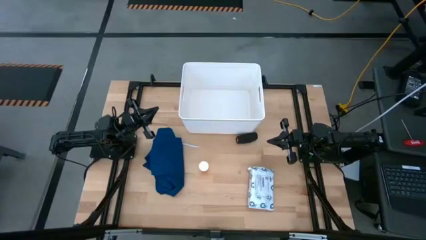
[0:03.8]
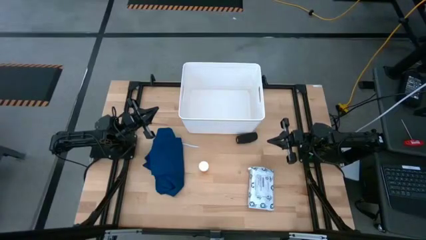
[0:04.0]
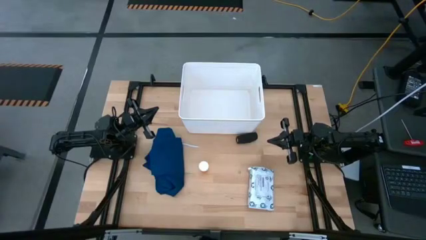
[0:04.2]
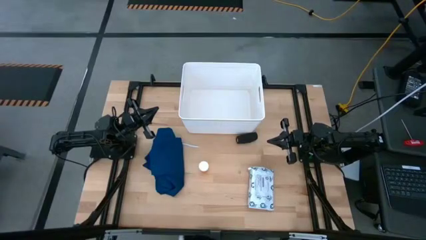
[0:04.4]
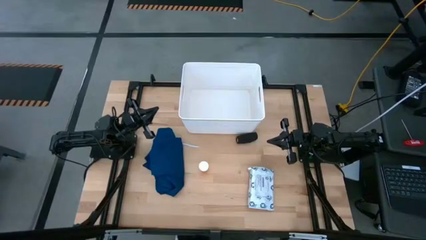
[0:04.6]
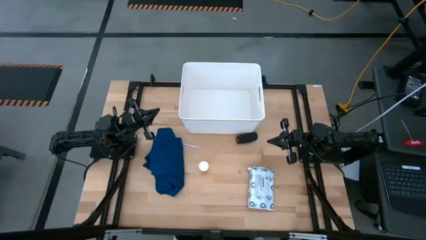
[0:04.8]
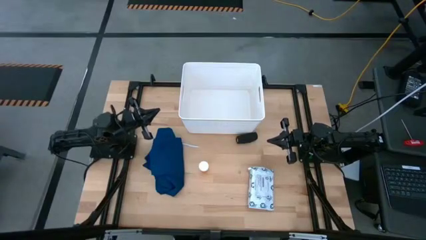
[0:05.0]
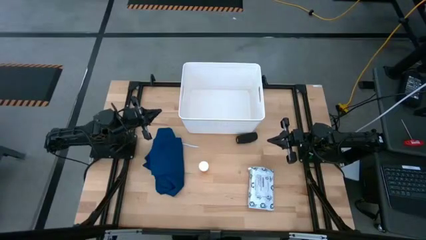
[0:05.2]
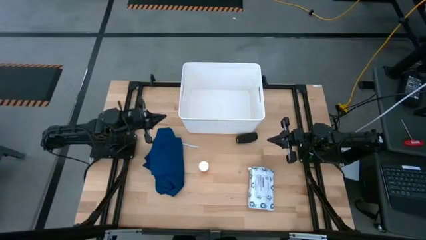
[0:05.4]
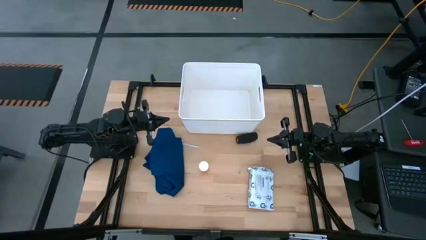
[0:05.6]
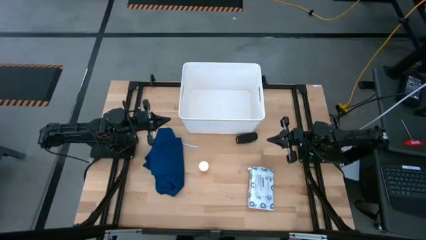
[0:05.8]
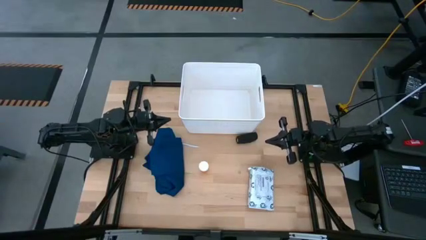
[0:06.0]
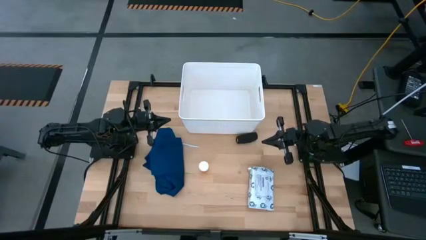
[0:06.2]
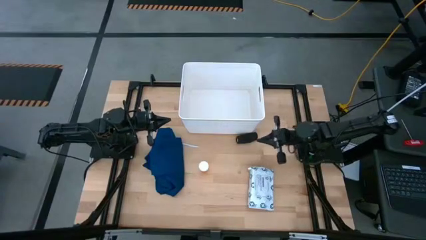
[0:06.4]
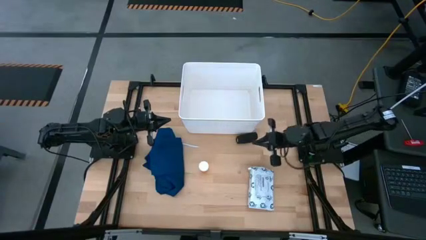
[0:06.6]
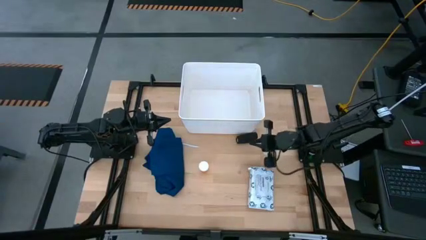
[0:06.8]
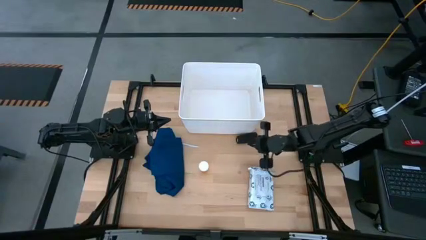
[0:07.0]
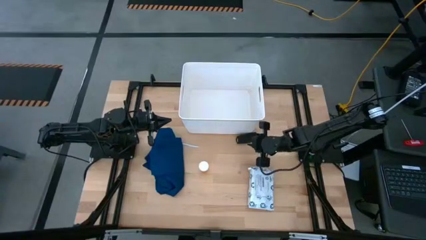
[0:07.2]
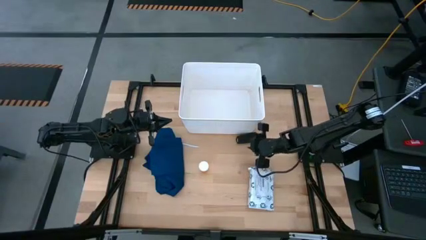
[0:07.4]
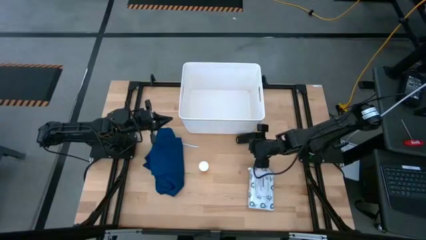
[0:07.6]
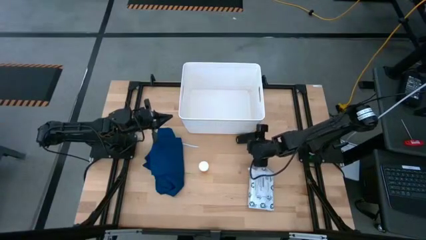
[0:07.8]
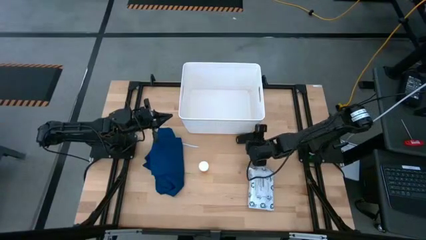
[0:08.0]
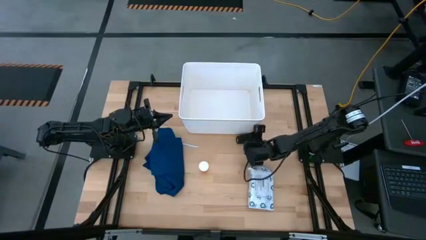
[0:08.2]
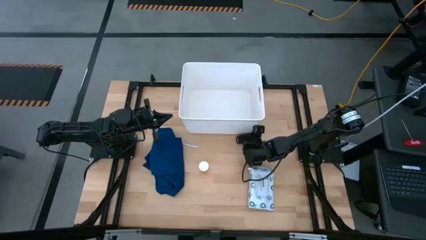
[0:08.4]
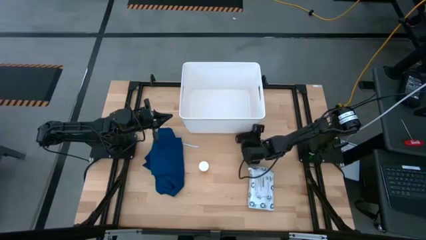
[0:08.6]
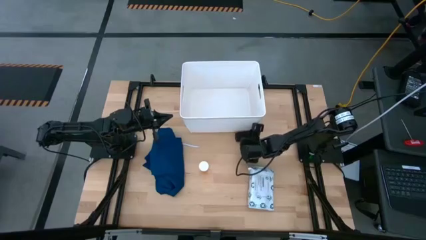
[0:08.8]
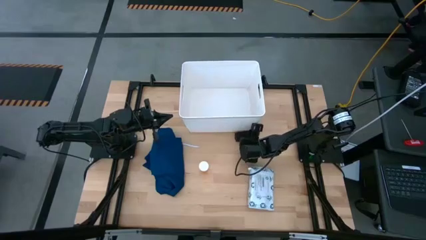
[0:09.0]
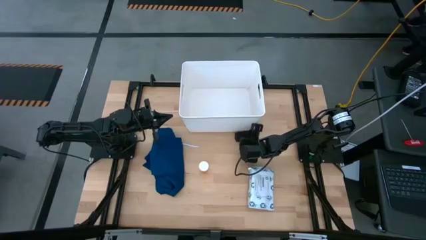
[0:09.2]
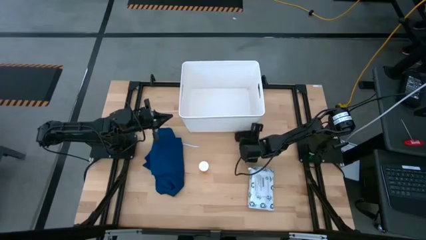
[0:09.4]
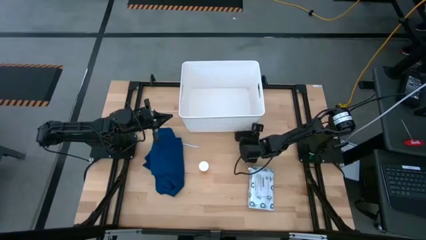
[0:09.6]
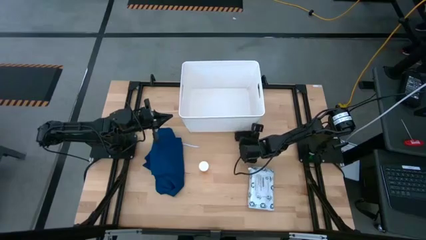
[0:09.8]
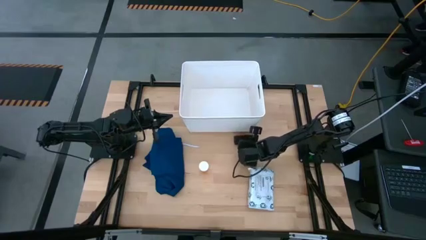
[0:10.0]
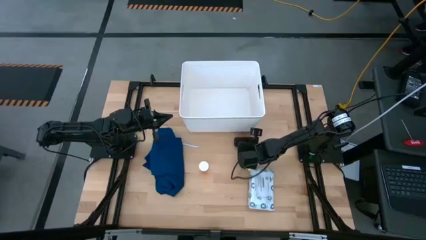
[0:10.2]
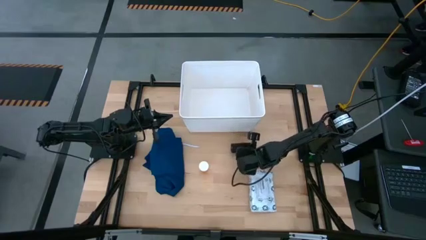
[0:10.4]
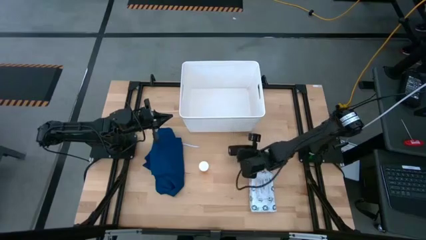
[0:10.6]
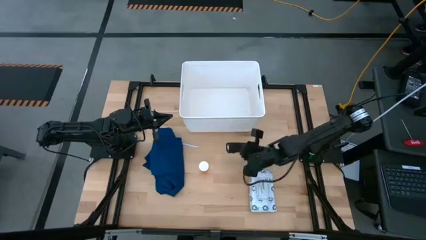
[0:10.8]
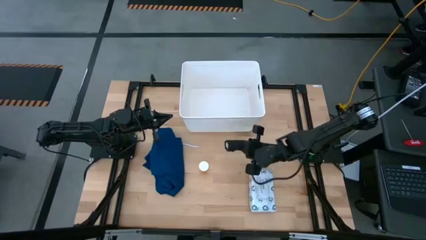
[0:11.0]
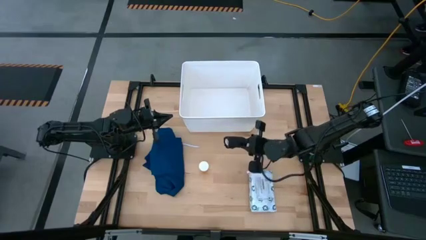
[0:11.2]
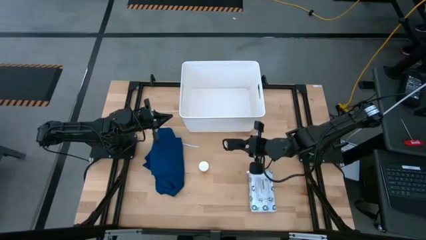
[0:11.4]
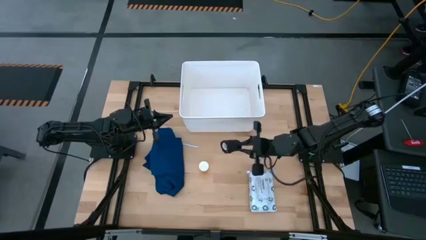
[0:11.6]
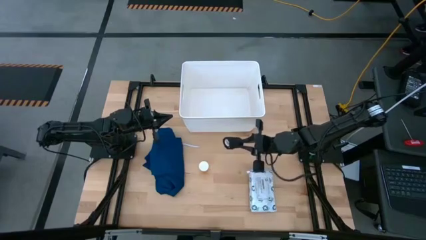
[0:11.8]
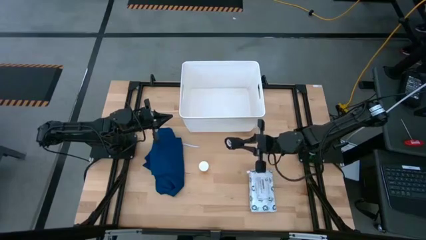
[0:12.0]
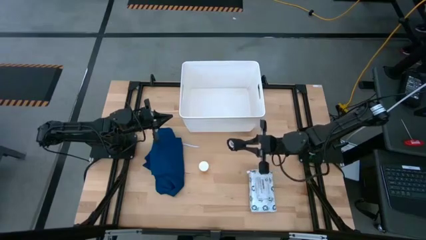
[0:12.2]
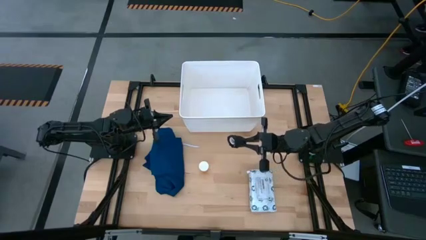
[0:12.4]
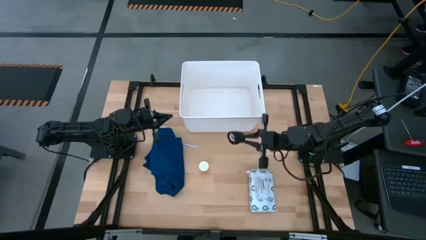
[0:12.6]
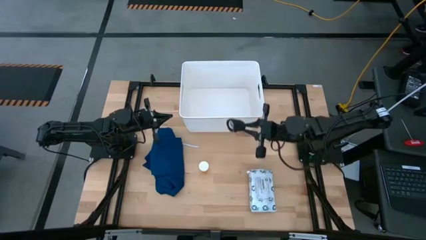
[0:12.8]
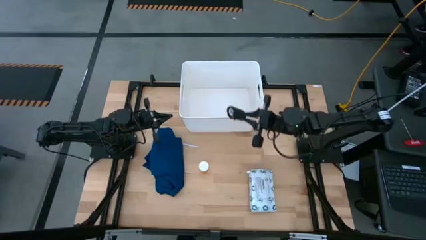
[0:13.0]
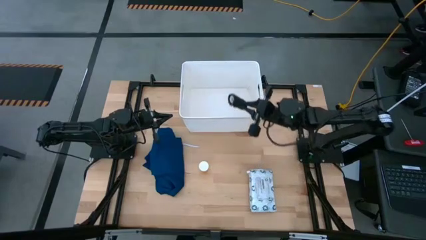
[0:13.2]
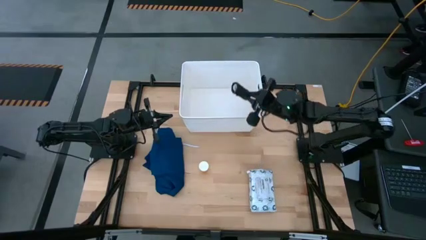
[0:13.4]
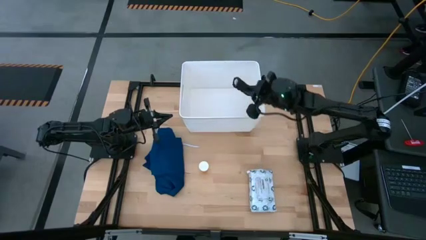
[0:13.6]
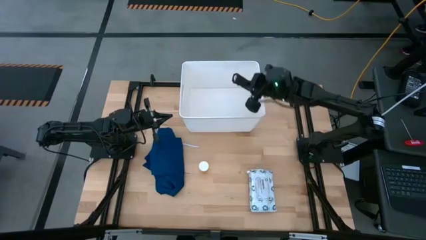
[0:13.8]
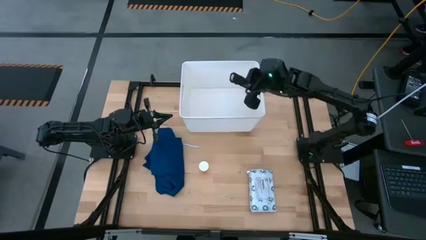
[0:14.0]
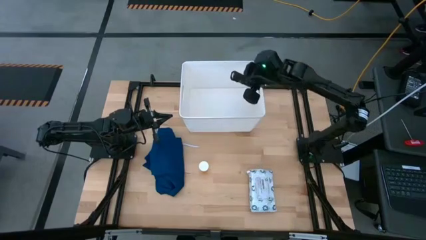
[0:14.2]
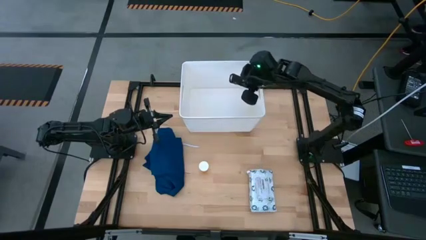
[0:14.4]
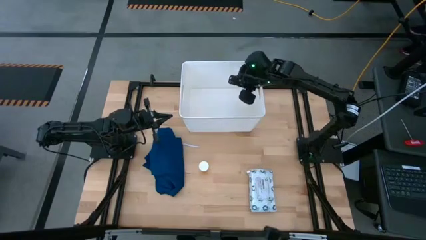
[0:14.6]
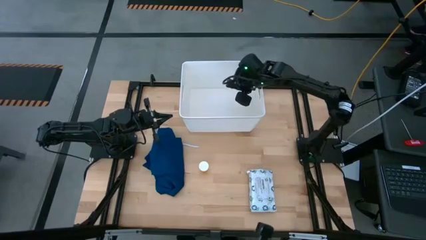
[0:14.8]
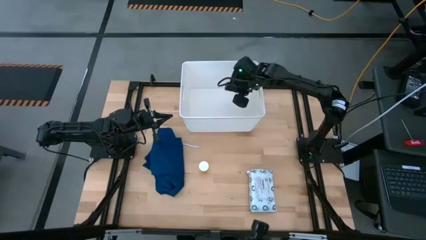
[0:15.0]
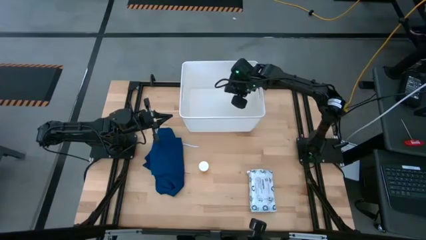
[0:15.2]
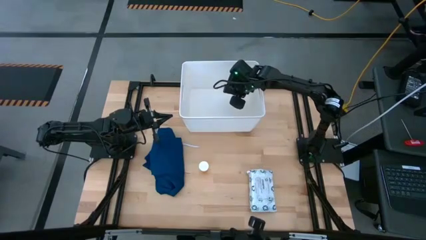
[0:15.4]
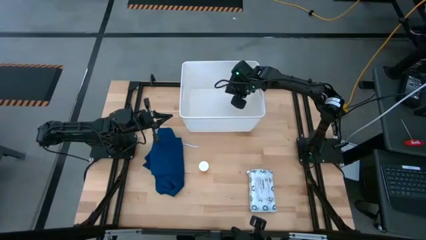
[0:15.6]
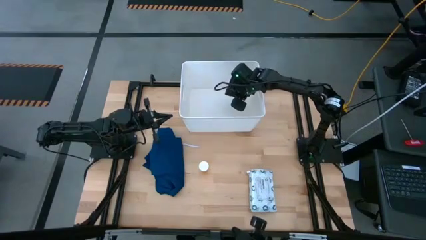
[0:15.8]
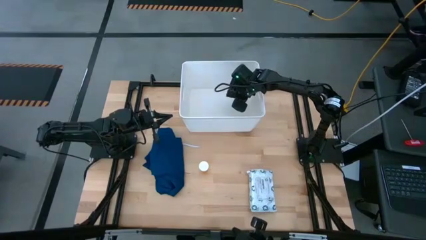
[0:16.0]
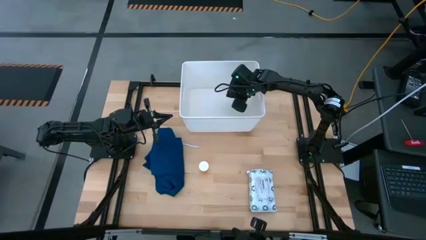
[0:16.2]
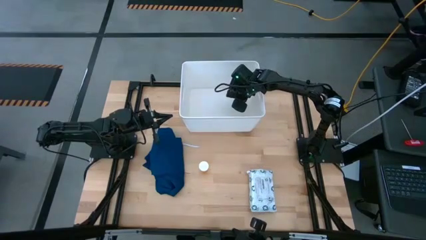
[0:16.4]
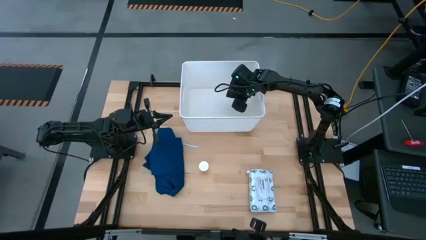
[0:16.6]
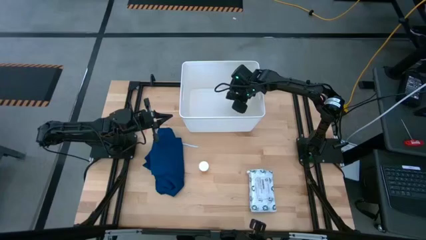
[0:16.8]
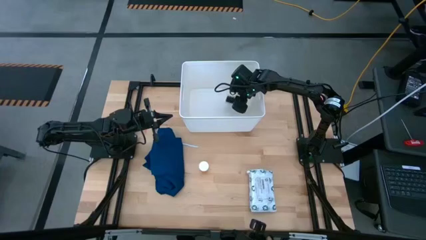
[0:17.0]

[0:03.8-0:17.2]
Task: Pick & place medical supplies in basket/bin
Put the black bandage into the white bin
